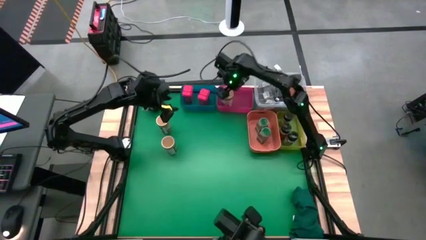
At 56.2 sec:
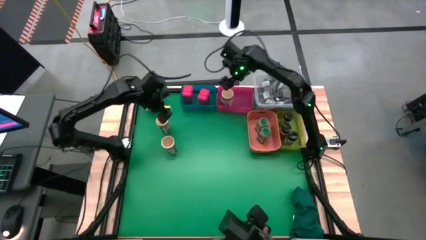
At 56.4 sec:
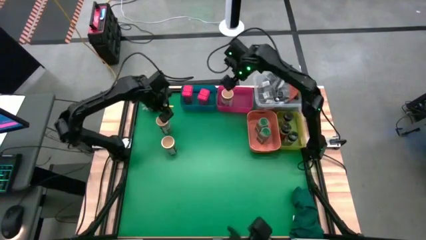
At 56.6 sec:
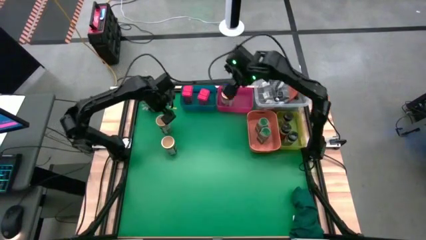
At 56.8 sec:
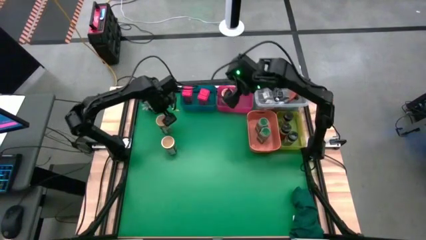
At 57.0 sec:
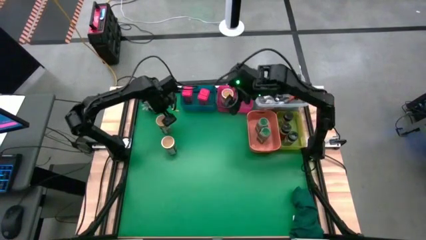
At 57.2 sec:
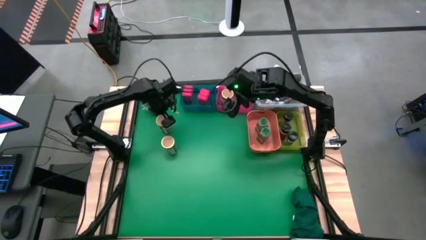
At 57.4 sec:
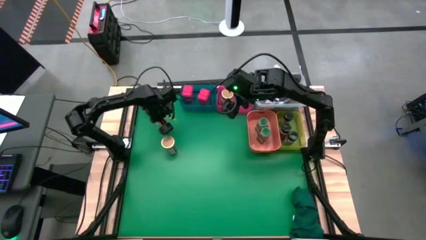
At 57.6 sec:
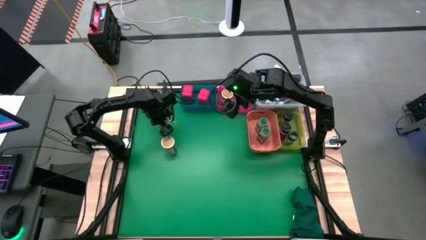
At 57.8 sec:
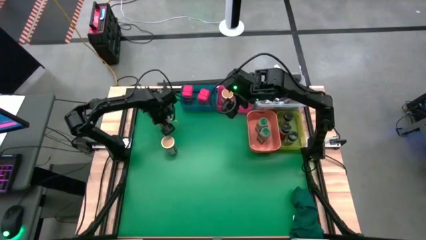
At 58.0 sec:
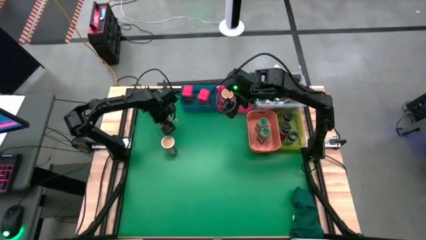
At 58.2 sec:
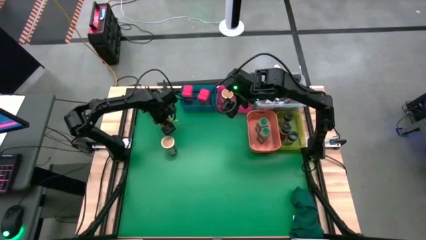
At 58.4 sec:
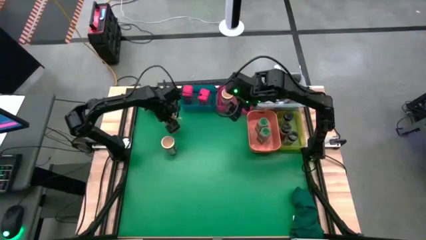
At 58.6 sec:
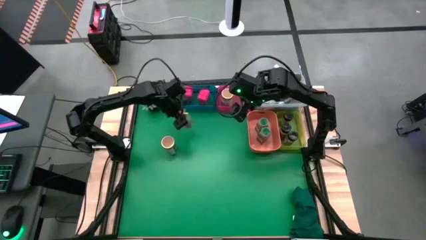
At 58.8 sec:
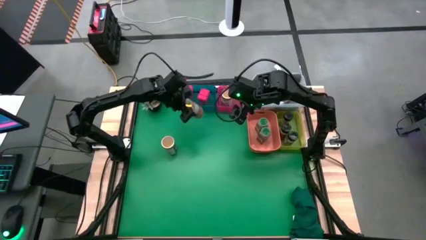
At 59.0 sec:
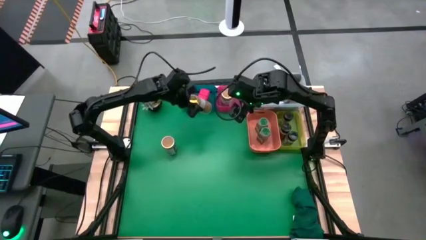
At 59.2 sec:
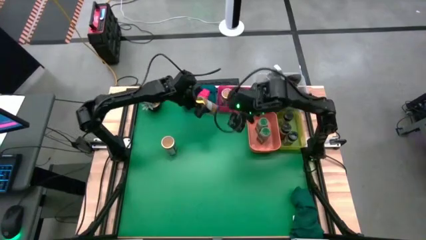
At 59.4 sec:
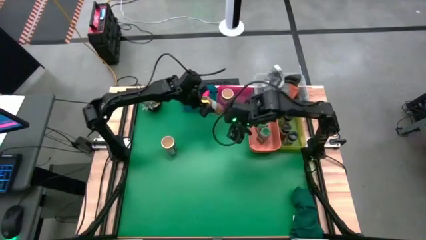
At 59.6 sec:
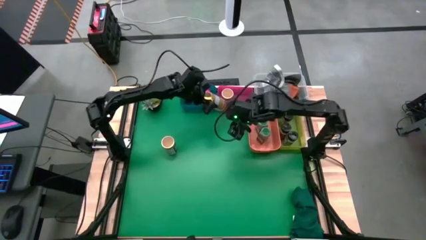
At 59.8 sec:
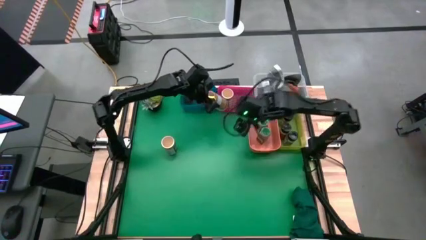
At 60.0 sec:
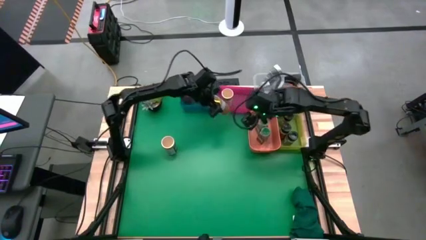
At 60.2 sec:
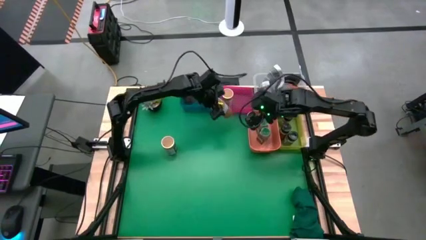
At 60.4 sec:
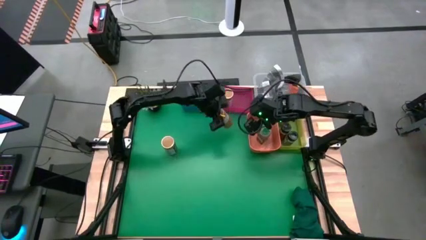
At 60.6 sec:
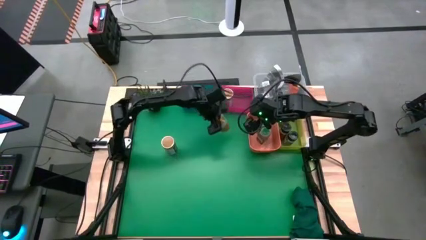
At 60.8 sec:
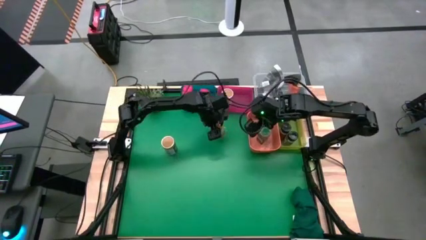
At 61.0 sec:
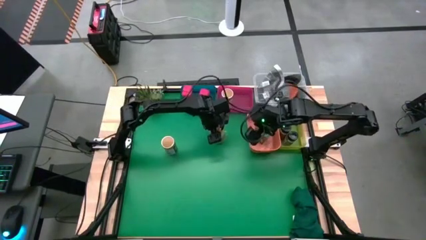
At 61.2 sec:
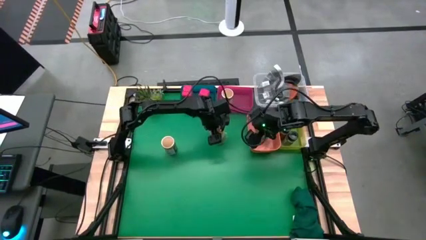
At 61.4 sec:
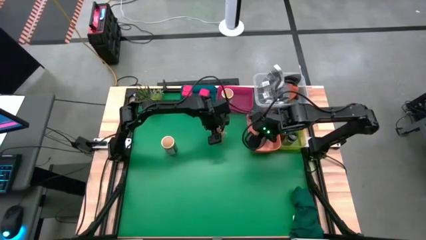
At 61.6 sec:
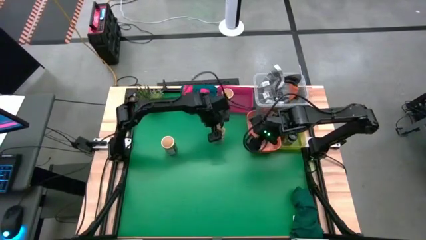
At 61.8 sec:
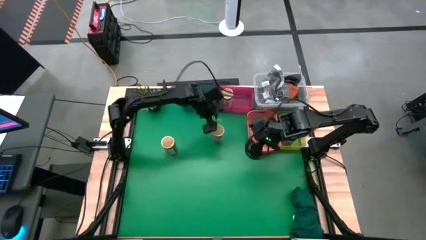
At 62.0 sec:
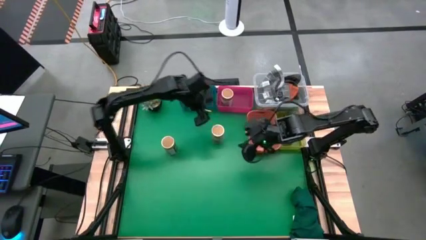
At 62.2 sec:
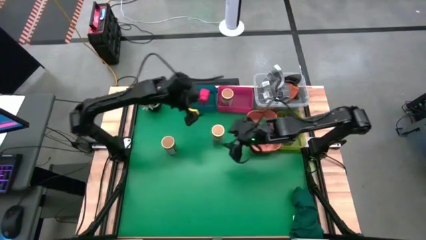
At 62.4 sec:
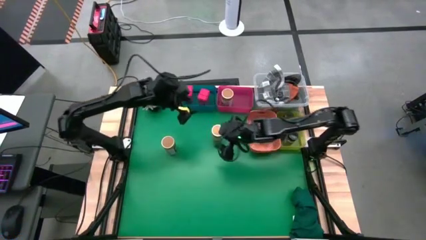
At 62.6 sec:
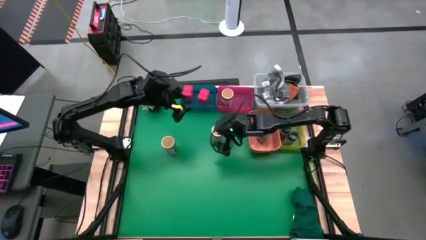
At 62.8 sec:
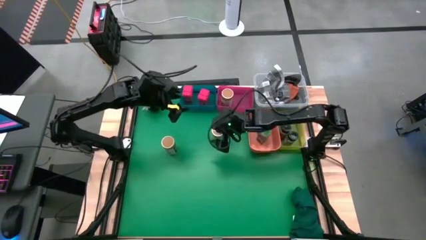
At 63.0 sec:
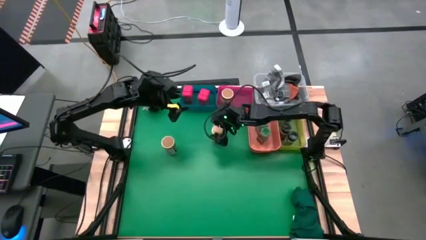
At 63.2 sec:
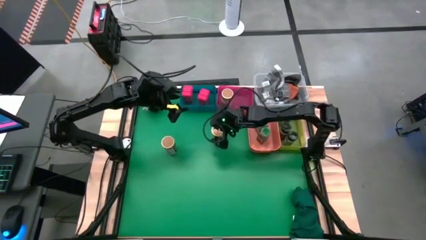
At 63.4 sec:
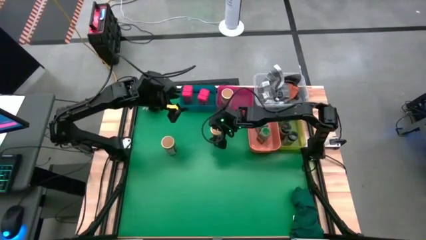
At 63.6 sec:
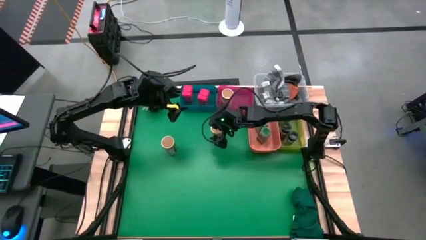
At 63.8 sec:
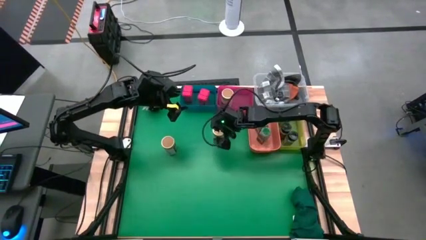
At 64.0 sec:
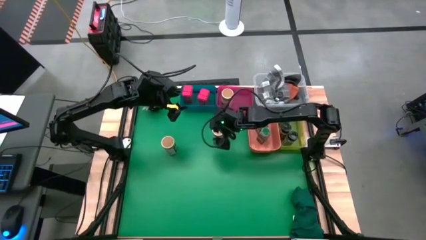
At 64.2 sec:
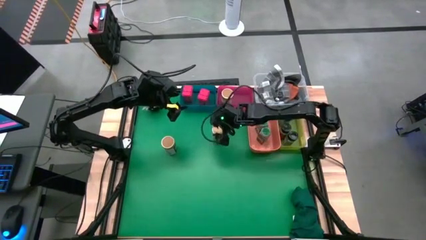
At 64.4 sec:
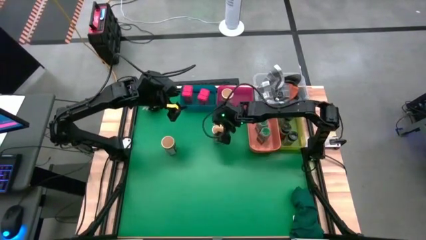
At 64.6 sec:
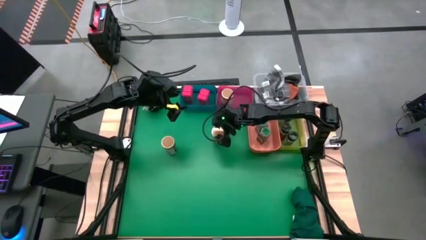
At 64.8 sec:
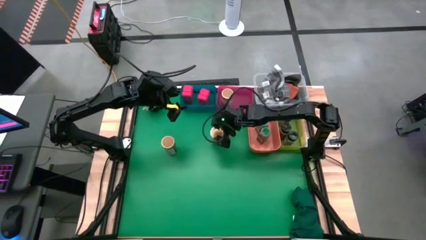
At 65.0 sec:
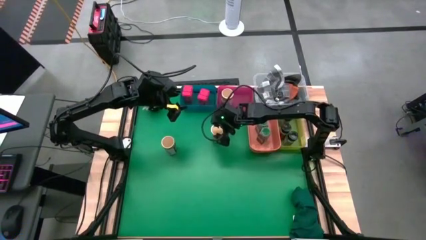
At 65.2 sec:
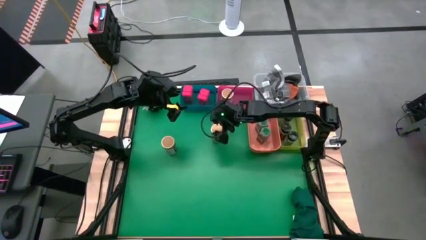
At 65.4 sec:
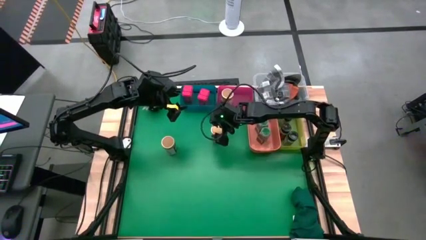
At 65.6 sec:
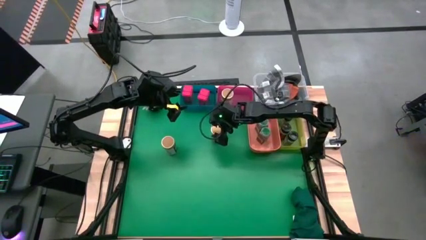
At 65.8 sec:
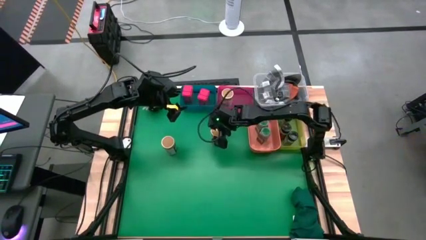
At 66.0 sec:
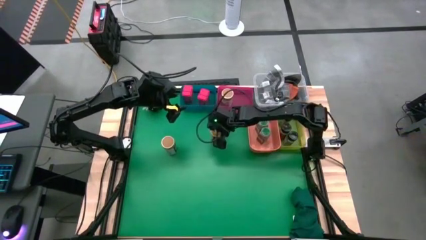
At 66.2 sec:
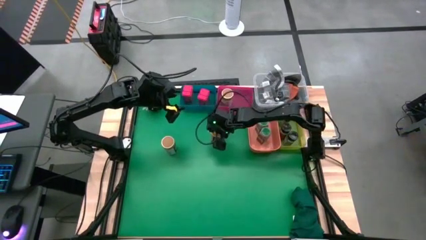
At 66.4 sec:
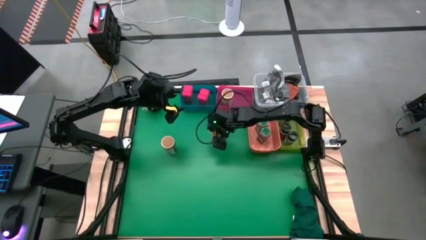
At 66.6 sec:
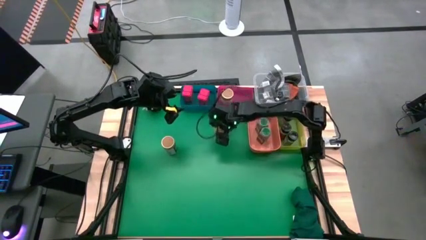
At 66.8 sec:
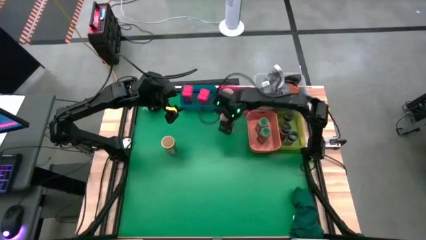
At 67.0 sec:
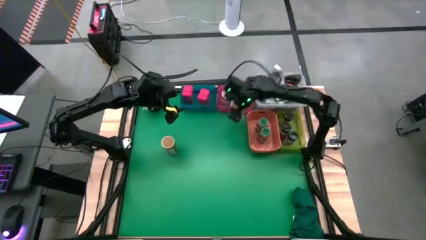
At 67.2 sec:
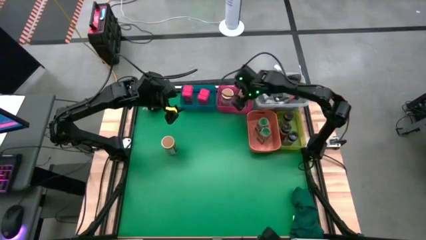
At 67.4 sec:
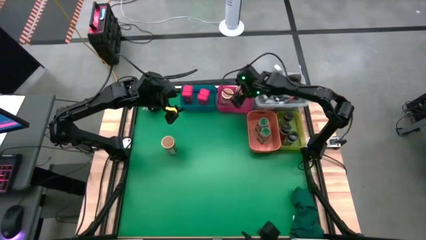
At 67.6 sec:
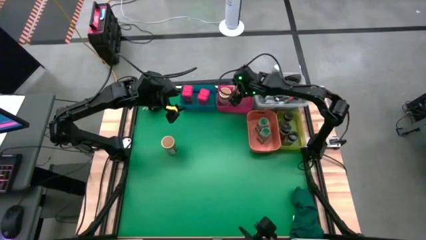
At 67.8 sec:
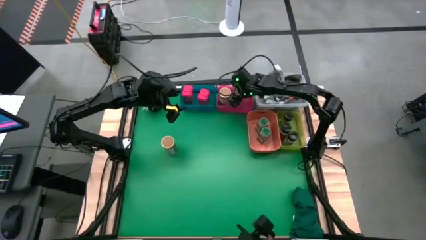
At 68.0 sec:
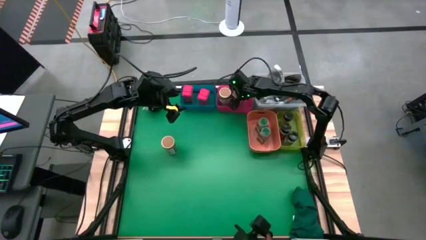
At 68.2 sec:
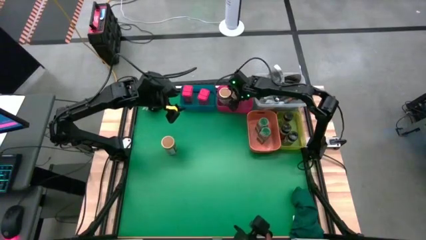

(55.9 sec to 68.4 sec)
Task: Sort spices by type
Put the top brown seasoning bottle into the red bin
